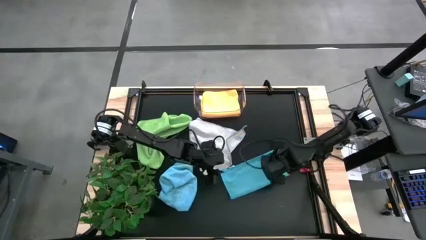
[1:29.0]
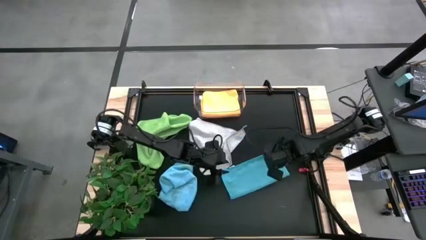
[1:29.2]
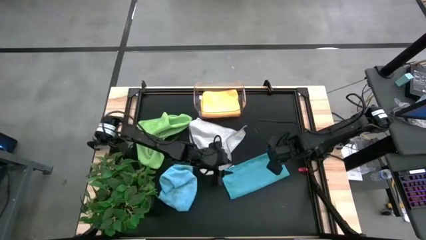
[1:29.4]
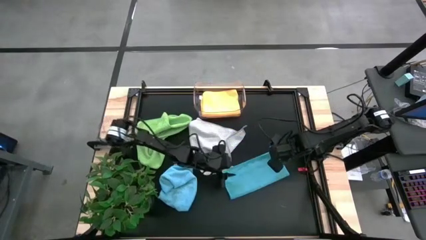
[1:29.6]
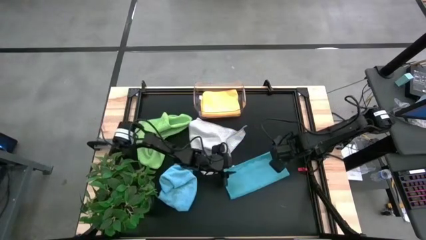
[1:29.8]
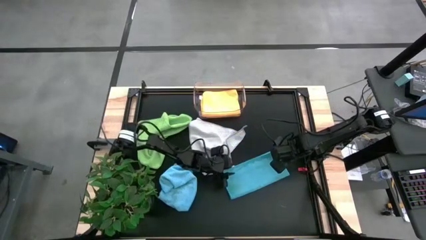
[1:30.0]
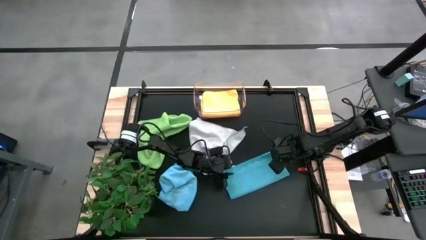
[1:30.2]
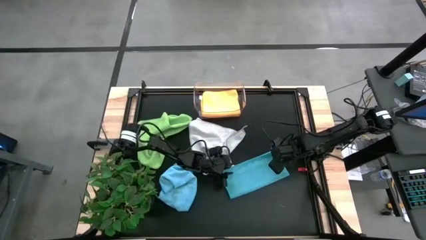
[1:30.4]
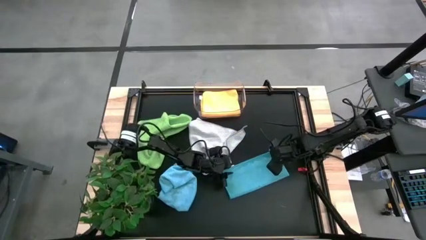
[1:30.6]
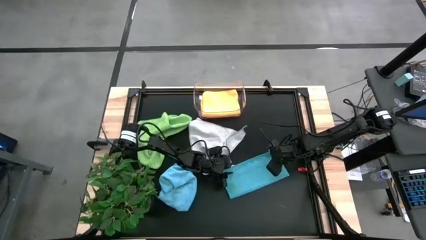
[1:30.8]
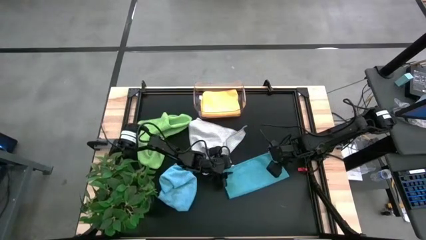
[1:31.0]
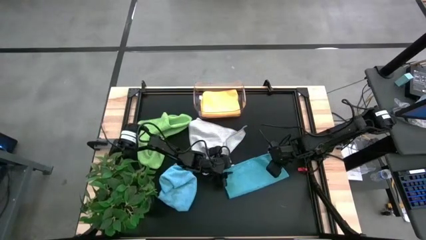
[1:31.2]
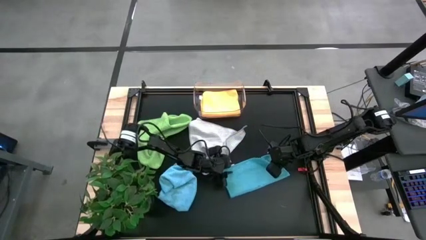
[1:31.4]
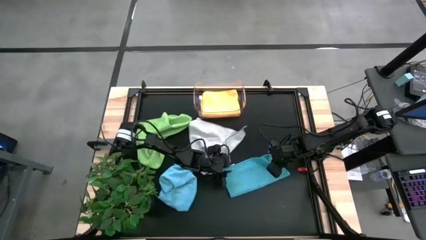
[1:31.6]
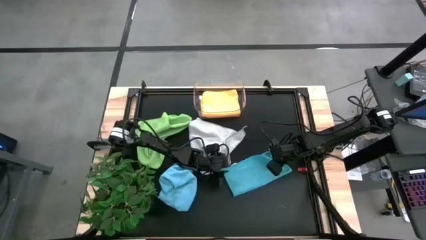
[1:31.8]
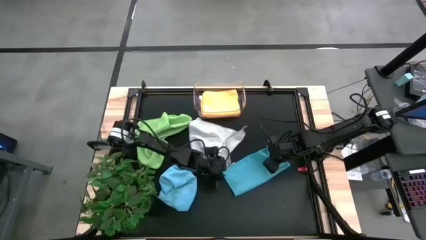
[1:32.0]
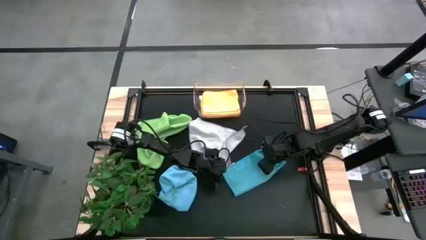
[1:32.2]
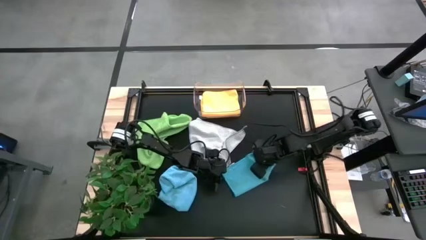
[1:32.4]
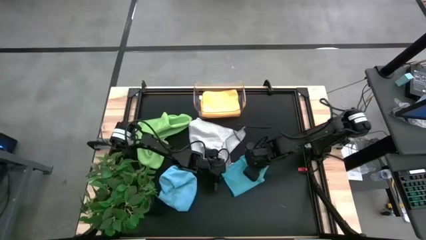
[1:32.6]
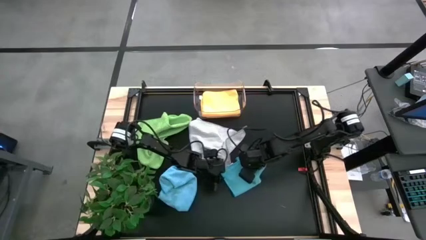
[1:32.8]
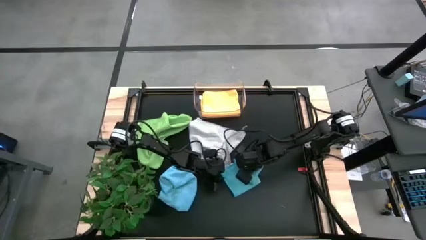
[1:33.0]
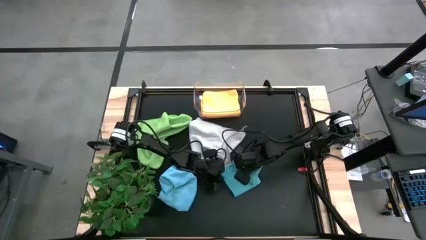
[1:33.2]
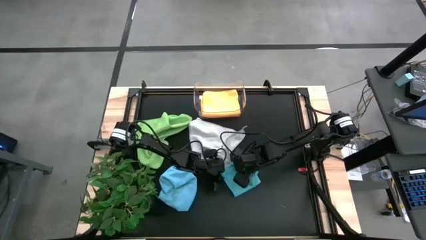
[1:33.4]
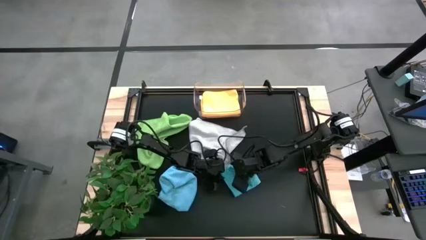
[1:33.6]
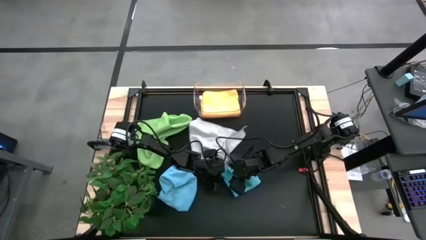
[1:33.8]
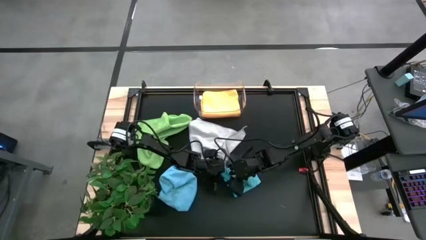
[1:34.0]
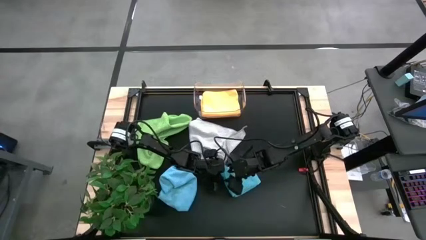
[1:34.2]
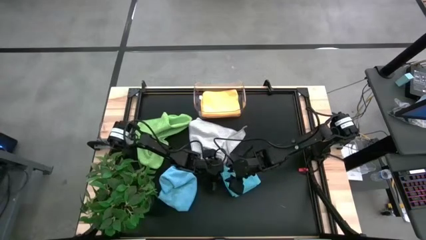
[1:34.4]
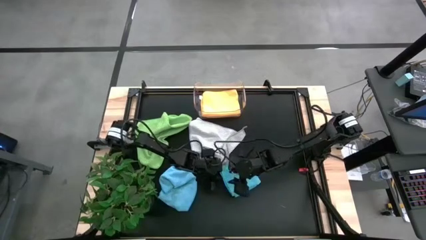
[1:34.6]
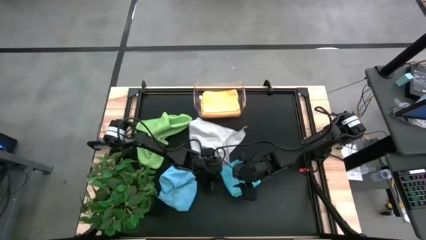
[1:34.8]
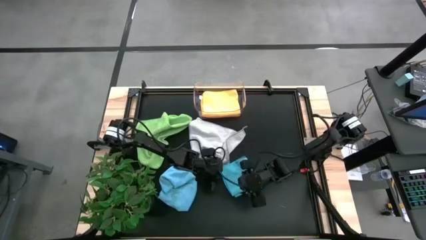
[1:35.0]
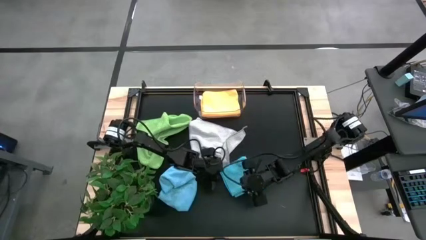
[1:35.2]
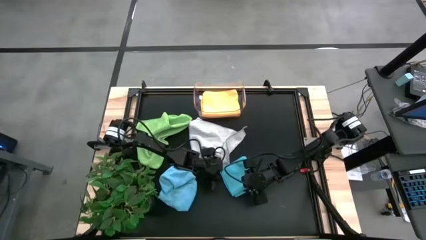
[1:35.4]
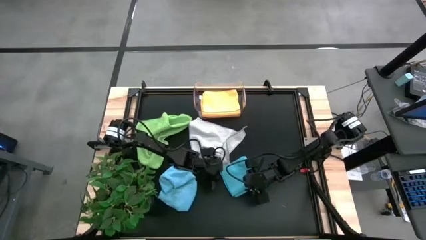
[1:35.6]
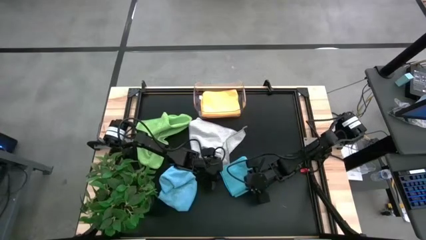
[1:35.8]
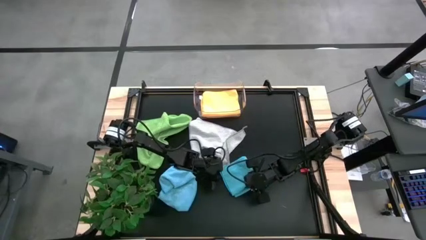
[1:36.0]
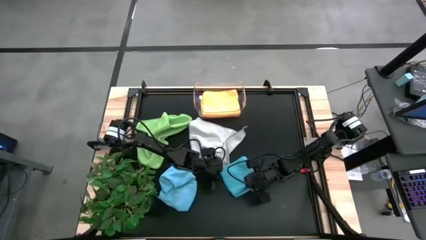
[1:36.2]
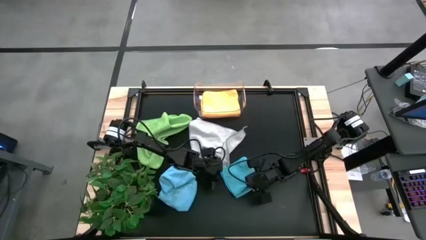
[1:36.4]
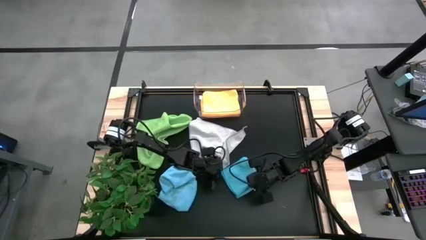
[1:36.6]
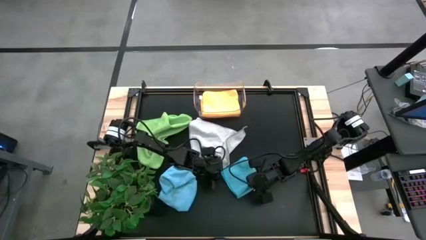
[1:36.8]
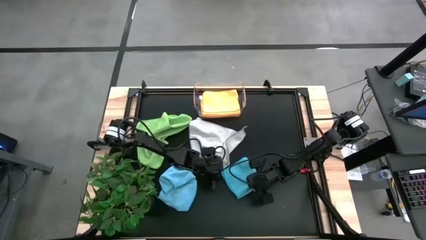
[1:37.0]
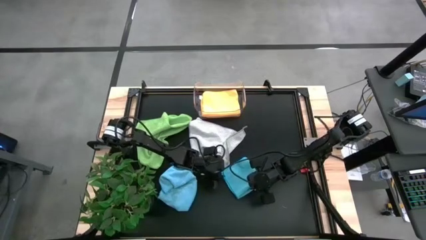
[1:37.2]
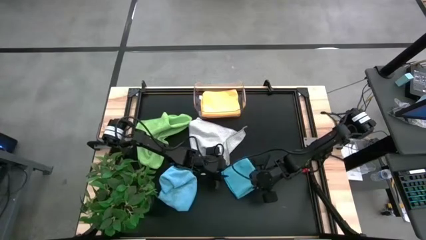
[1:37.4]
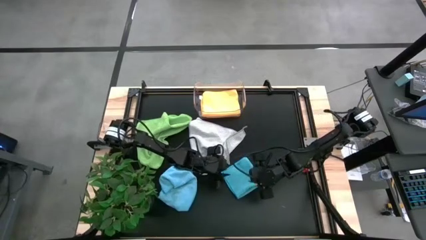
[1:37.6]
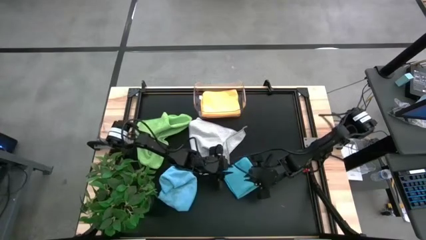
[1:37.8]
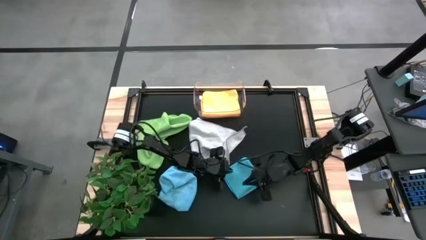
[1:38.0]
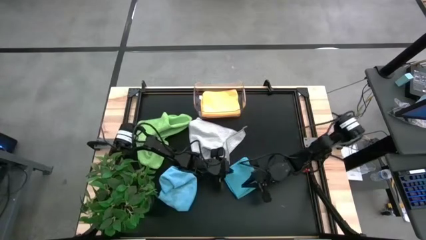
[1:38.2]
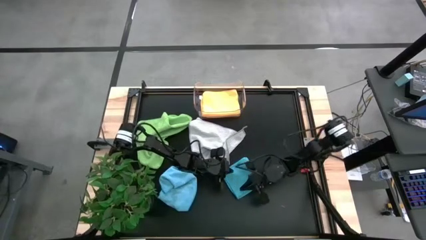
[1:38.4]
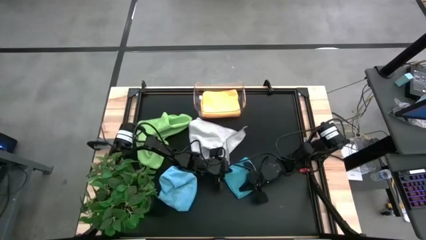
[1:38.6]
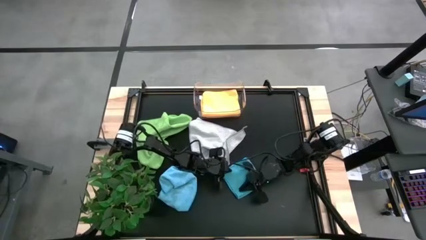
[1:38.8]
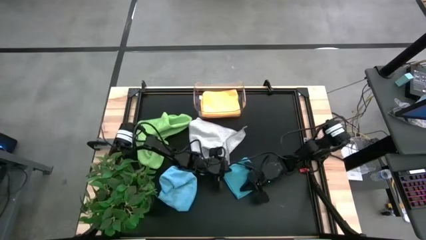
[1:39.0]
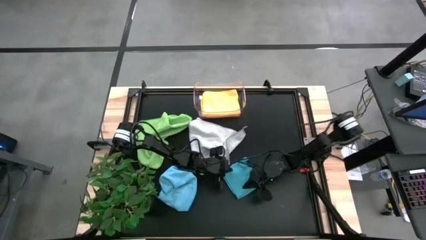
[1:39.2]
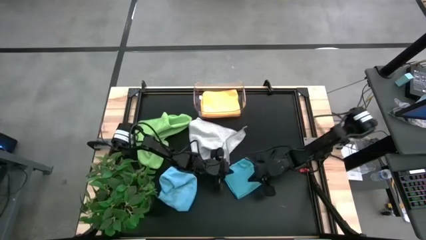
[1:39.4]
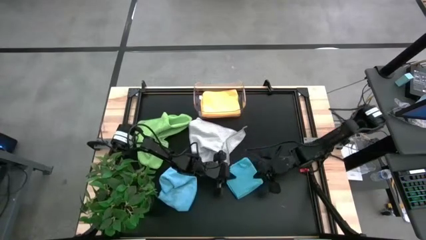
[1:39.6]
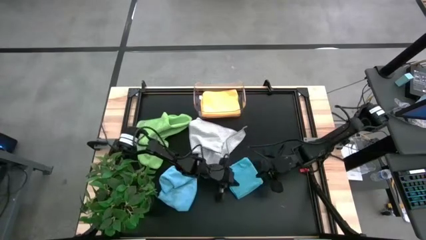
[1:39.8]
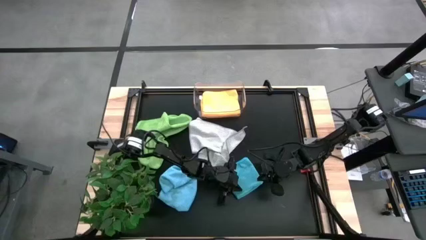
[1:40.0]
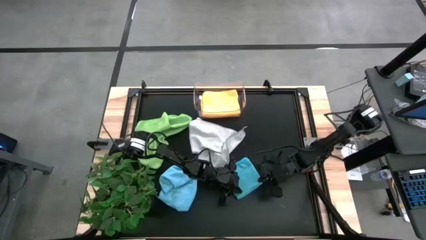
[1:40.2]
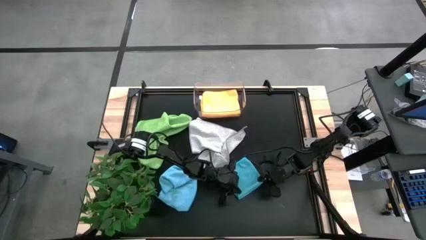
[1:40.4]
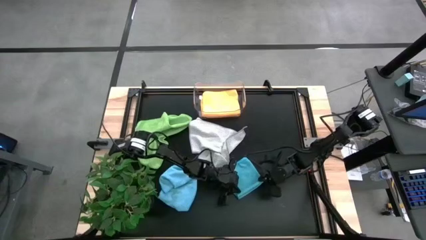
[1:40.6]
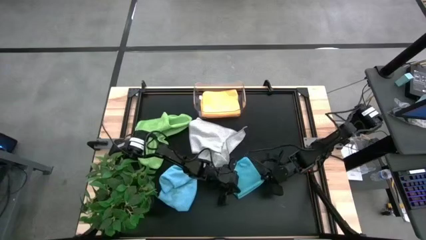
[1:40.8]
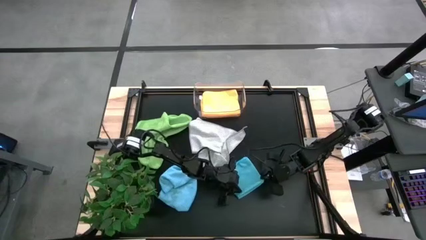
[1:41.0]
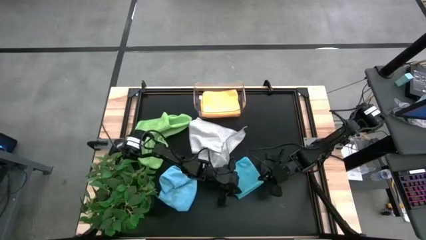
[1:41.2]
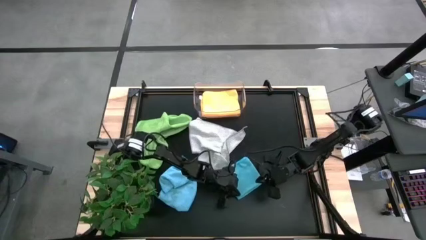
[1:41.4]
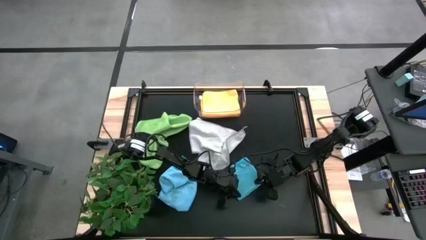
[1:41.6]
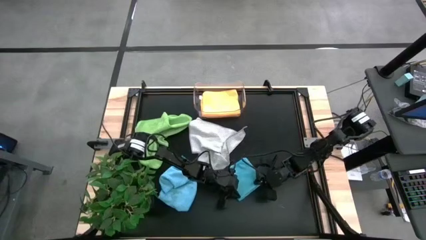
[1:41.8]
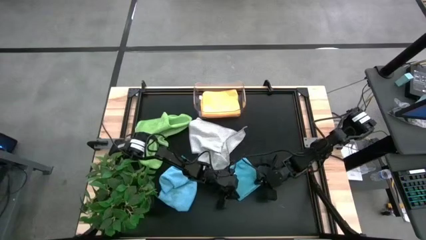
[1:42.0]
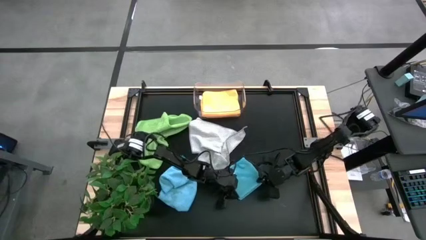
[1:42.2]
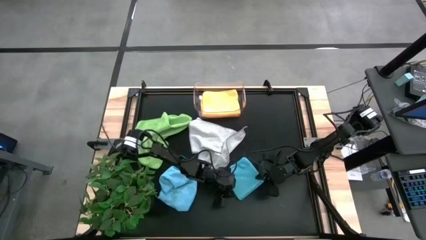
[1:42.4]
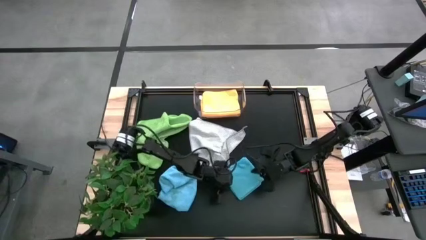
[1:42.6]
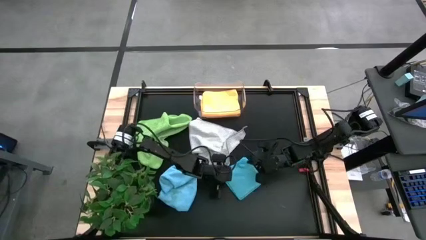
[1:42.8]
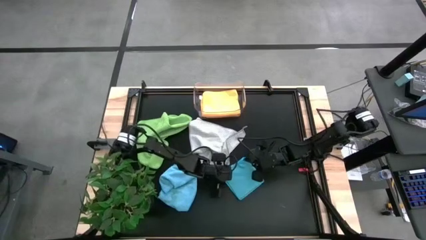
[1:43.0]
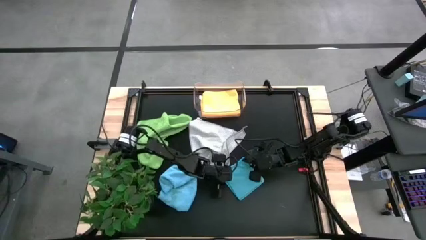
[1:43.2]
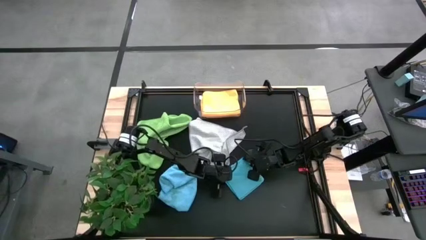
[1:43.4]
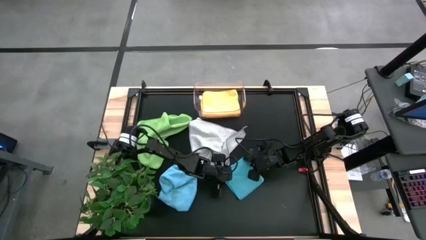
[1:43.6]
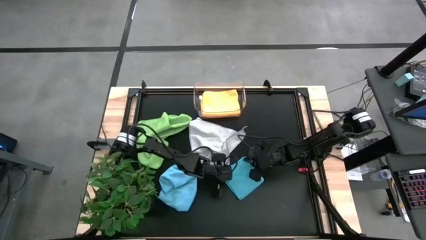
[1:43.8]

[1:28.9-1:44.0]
Task: Fold microfiber towels
Fold the right blue microfiber cloth

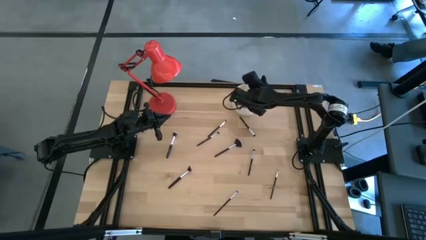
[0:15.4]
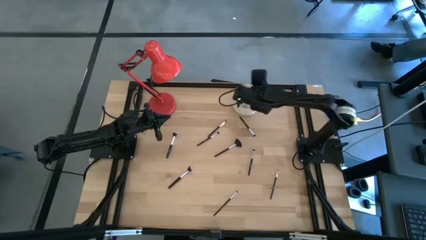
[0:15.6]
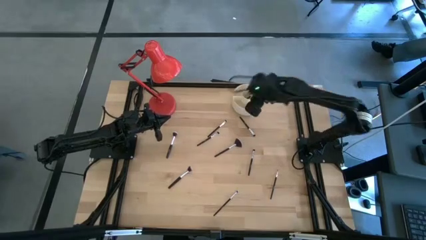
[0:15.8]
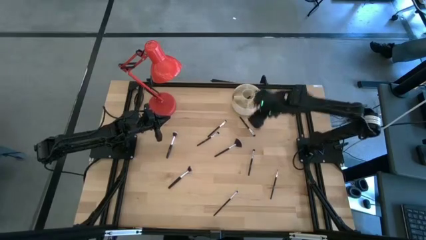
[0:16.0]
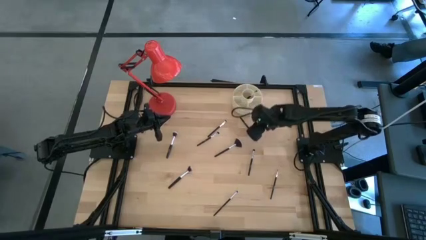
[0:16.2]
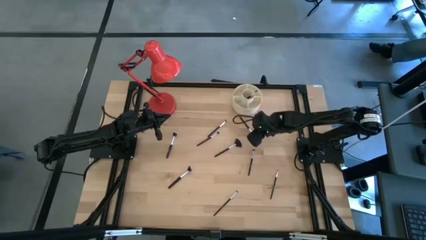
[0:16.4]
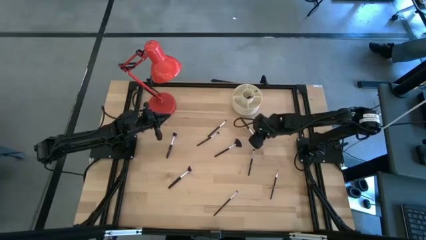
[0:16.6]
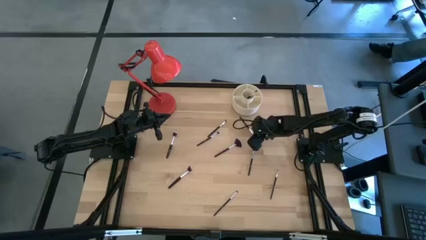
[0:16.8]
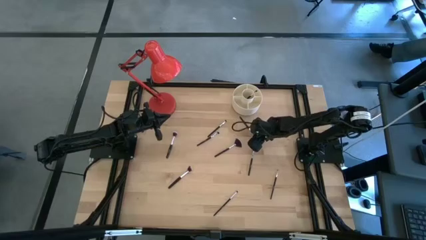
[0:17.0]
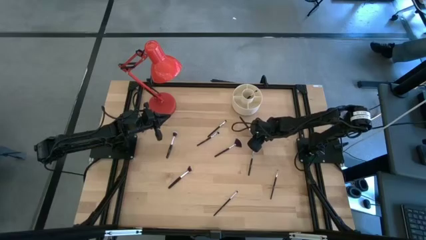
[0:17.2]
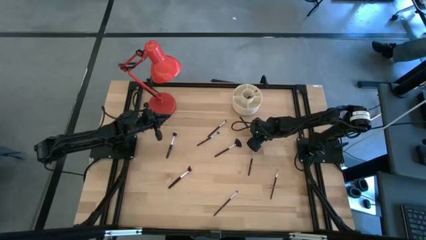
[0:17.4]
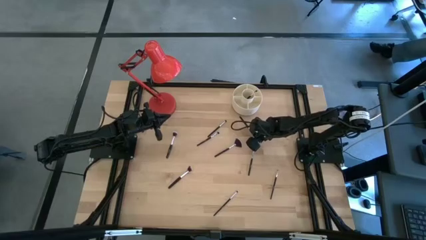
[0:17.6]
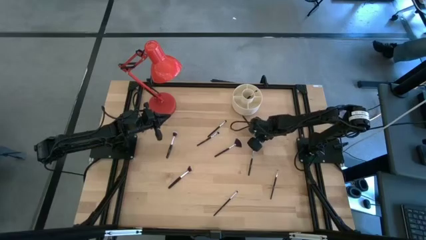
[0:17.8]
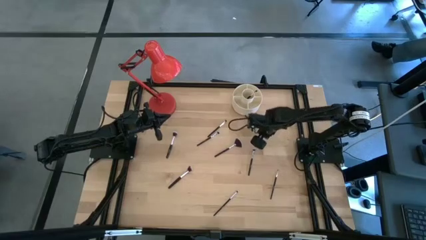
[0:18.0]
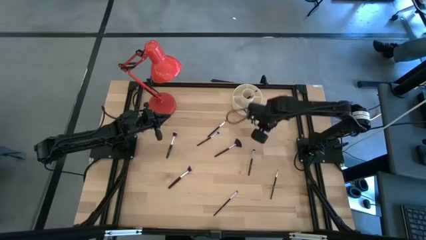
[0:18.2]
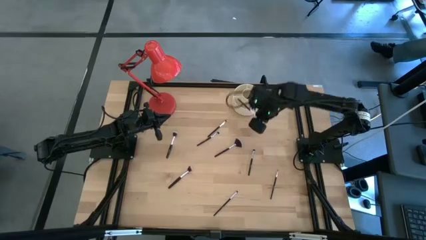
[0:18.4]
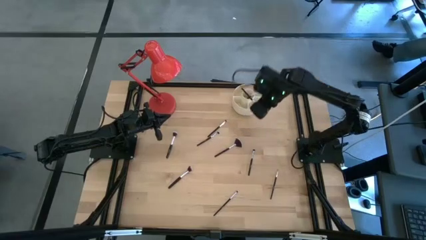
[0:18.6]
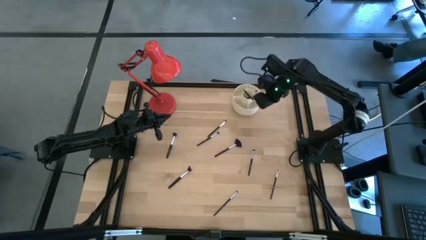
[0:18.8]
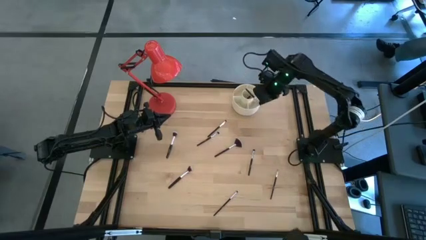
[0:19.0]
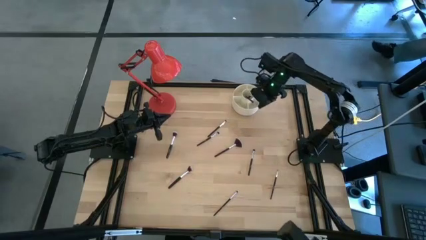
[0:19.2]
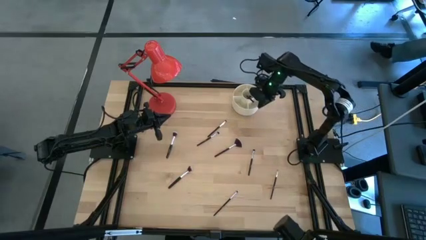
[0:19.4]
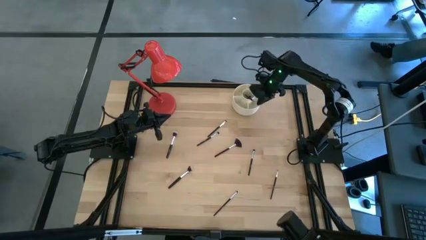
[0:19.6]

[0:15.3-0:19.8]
Task: Put items in baskets/containers
Put the black eyeshadow brush into the white organizer
